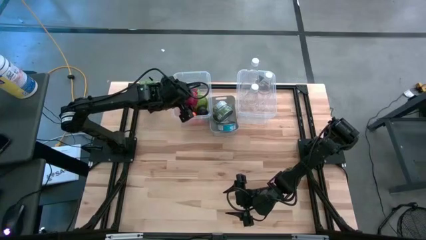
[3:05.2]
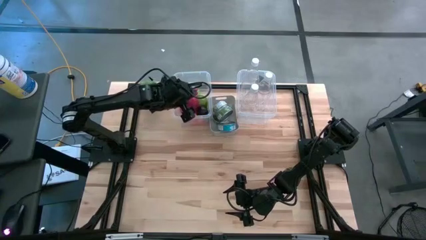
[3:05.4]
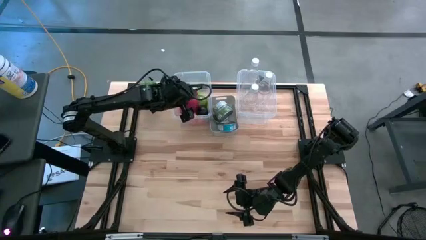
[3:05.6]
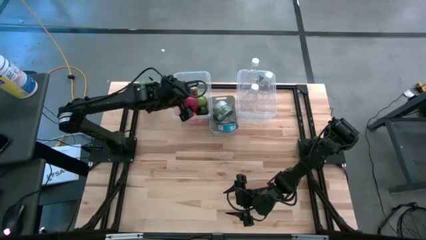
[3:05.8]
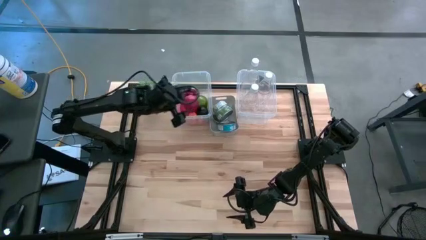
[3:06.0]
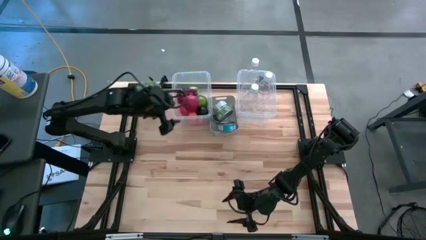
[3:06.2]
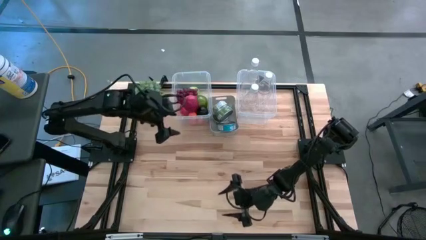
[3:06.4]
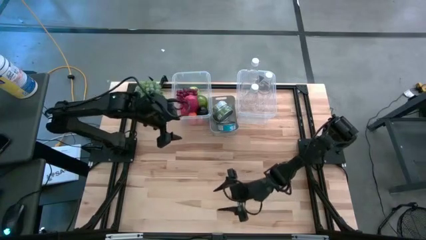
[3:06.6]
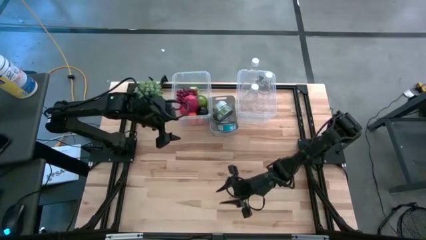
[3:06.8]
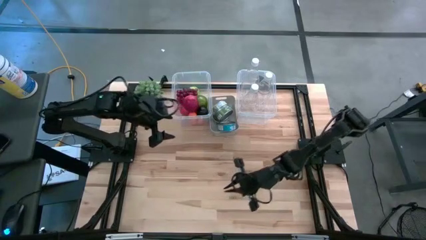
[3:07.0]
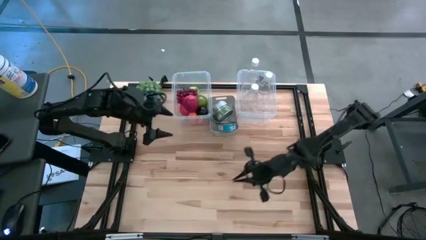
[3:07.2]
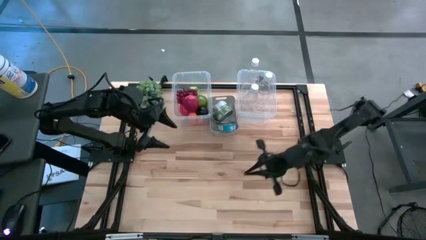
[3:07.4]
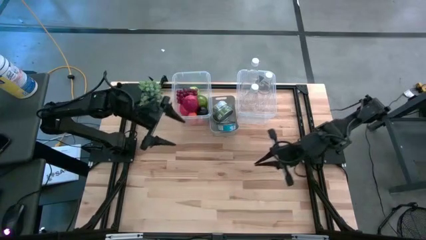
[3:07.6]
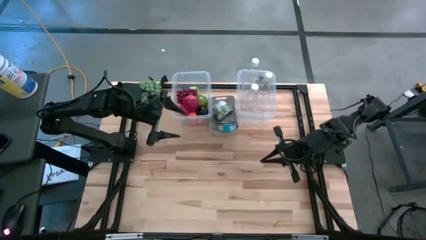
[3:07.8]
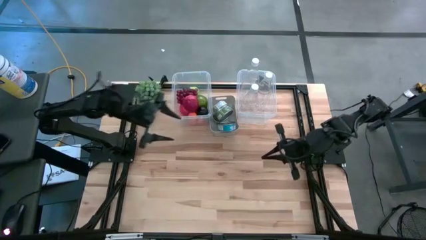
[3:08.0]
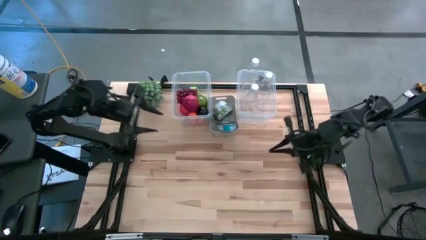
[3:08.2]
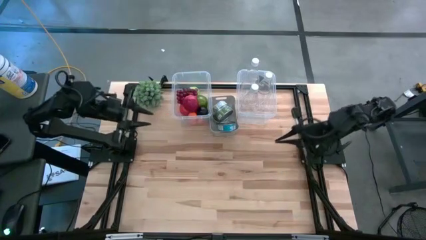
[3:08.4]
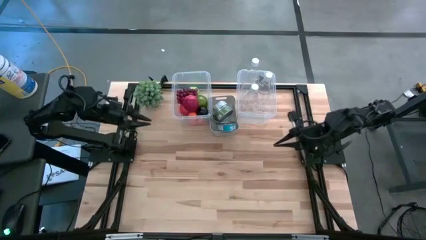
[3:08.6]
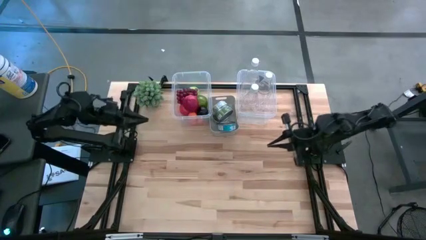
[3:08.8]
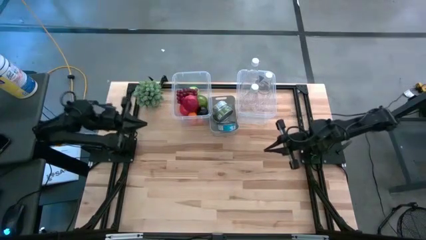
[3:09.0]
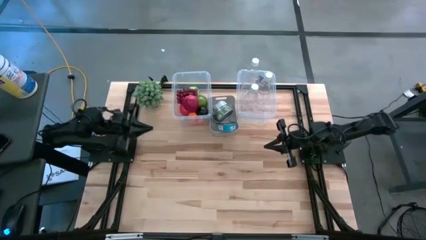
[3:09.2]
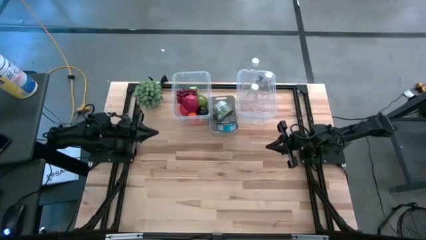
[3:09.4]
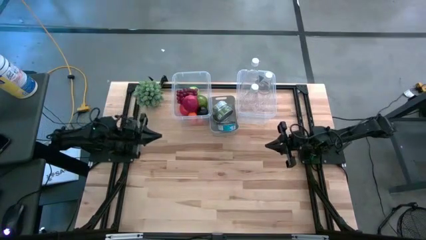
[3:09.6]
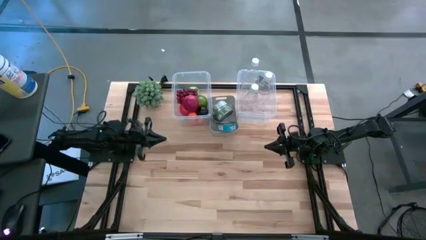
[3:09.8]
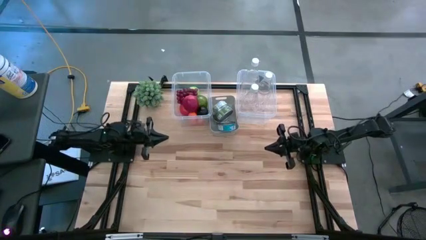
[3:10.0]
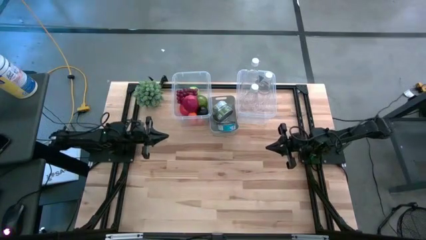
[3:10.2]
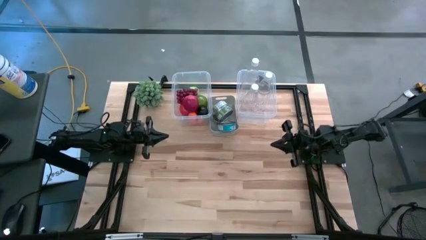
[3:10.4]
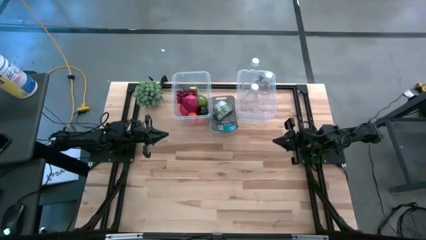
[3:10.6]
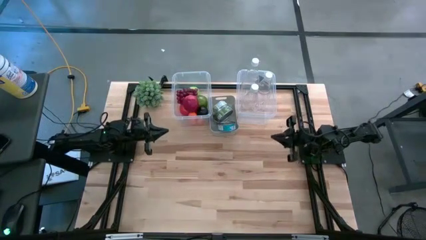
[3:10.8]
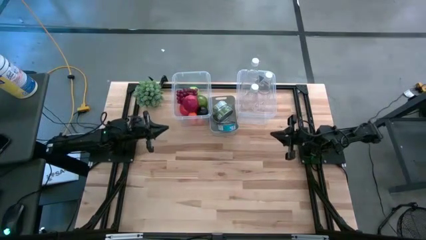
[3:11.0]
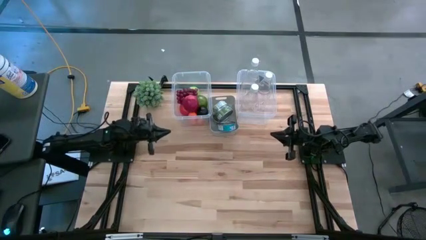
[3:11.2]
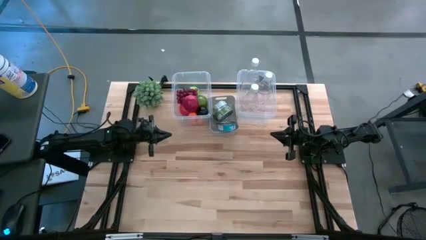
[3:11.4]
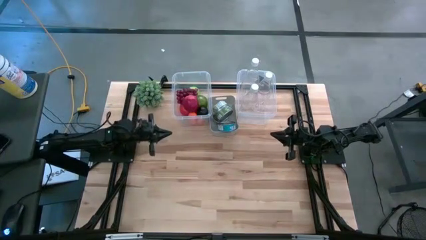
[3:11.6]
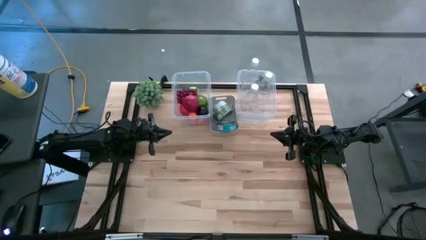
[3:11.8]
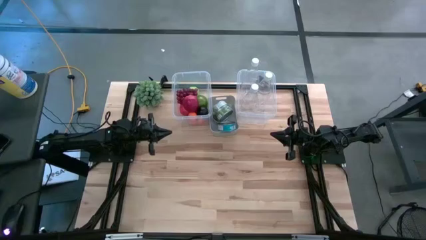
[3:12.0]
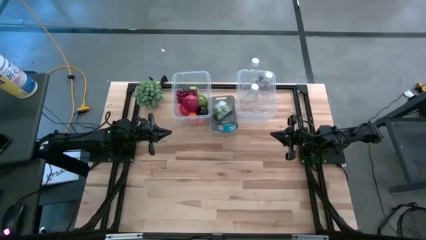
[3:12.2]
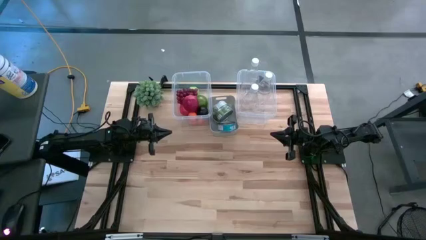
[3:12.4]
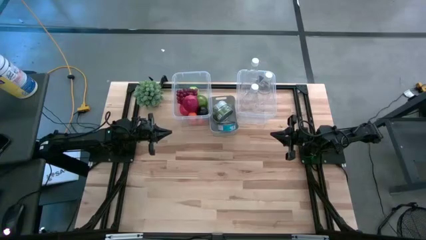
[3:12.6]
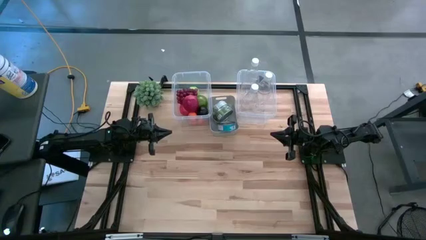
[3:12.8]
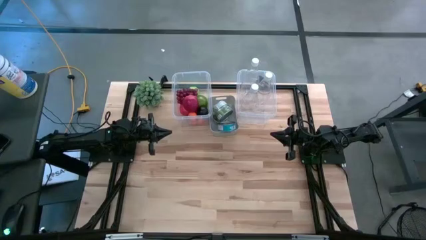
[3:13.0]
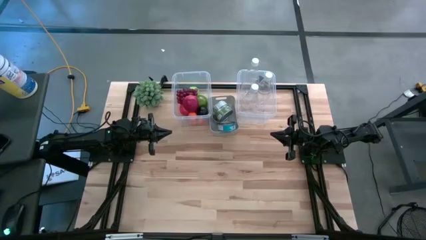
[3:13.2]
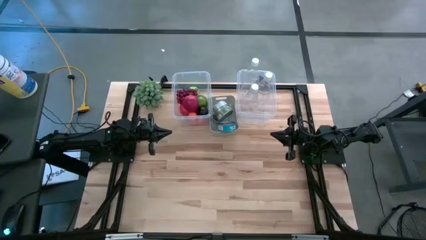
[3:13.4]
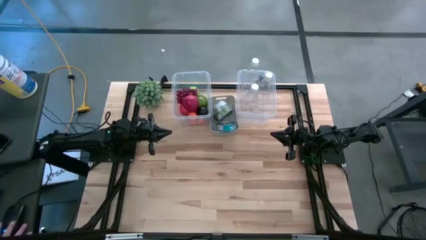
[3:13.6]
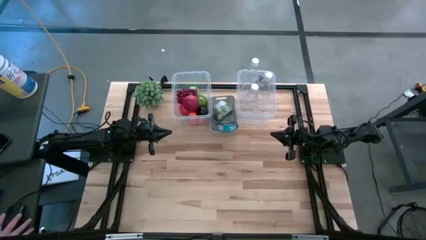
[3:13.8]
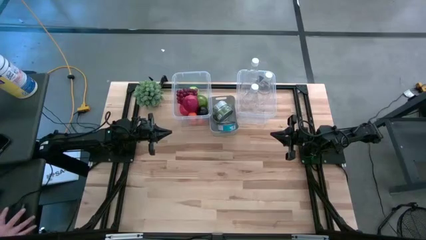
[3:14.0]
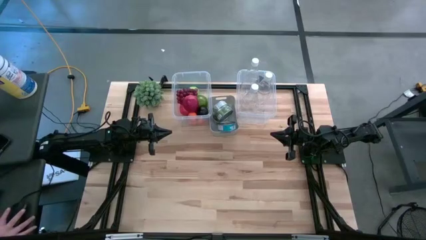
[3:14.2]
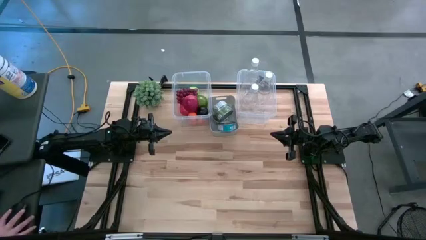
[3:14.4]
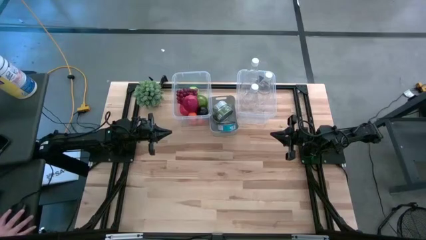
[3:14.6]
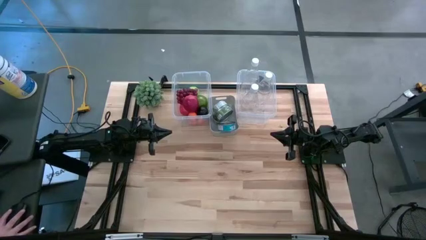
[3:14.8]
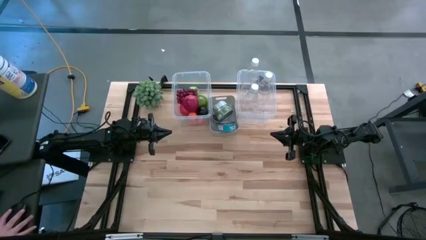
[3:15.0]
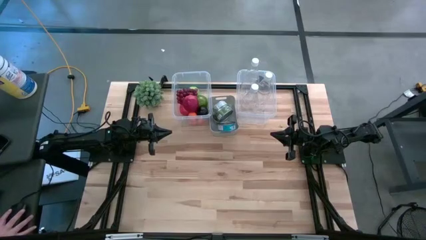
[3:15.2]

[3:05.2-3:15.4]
Task: Pick & Place Food Item
Return to Home Position
